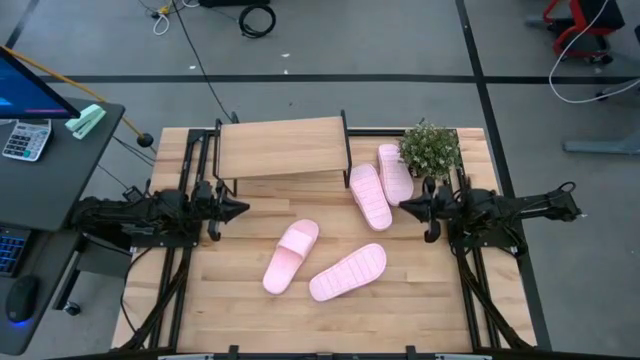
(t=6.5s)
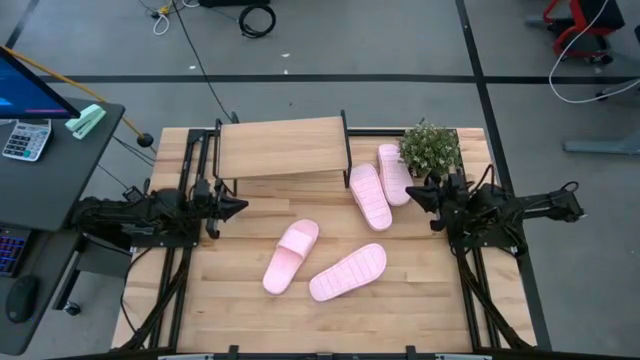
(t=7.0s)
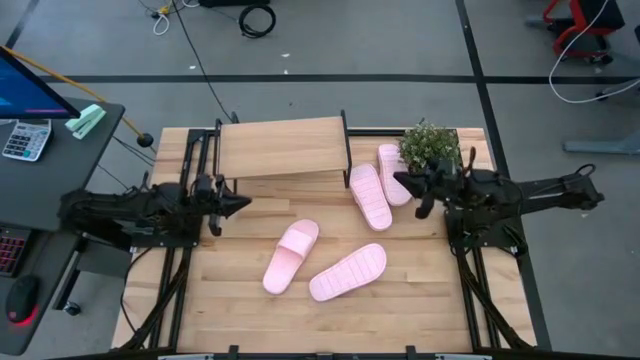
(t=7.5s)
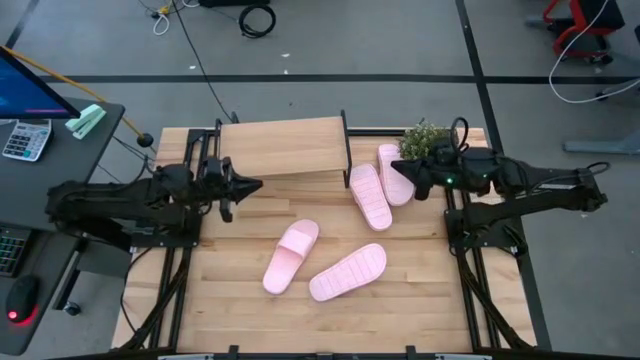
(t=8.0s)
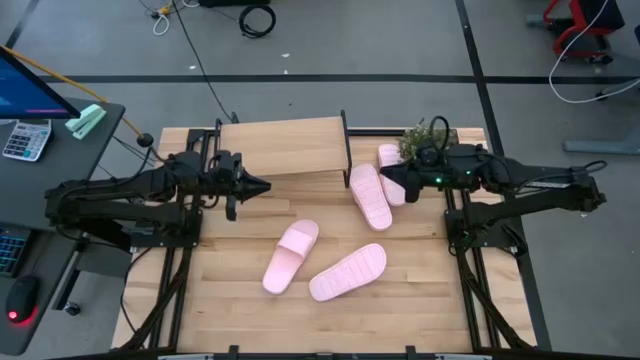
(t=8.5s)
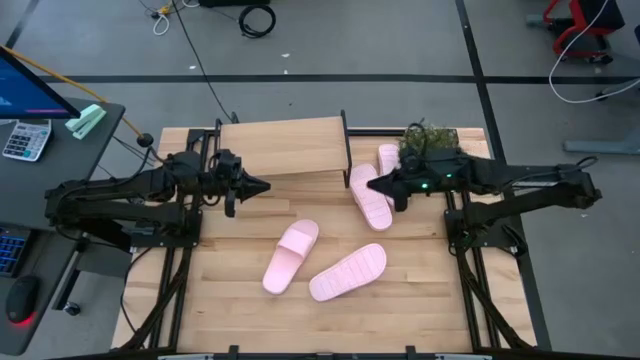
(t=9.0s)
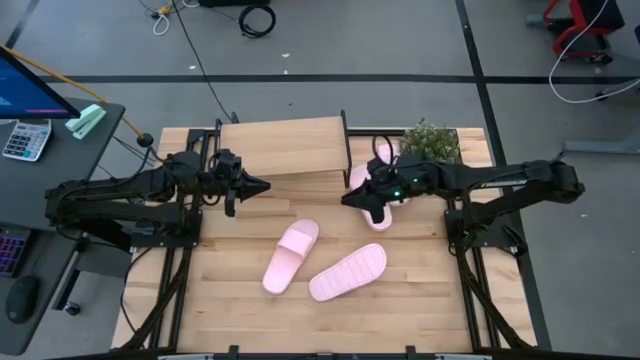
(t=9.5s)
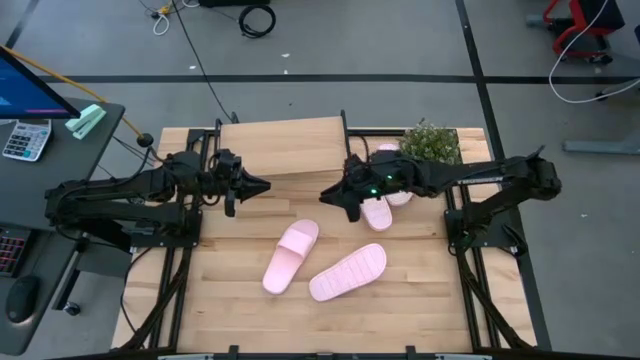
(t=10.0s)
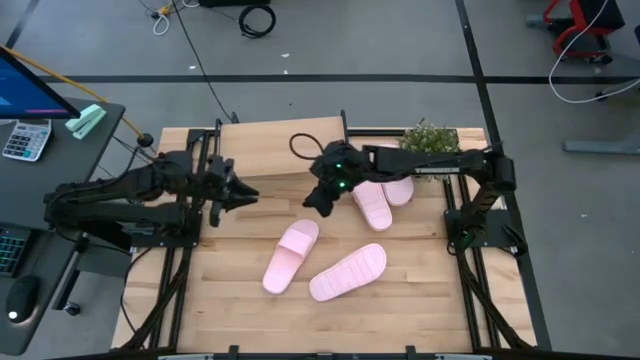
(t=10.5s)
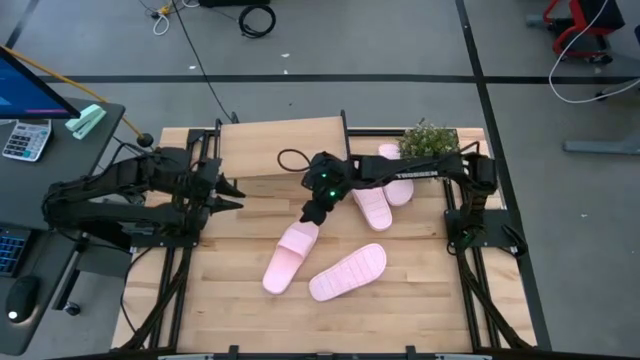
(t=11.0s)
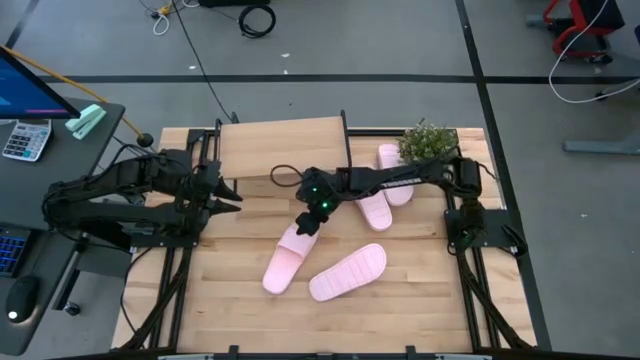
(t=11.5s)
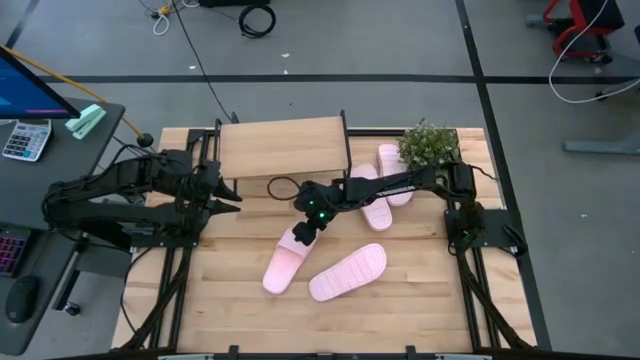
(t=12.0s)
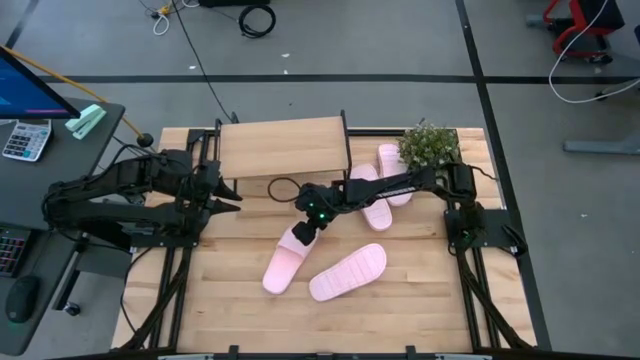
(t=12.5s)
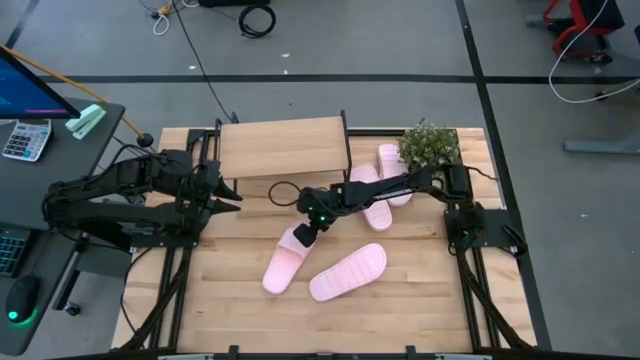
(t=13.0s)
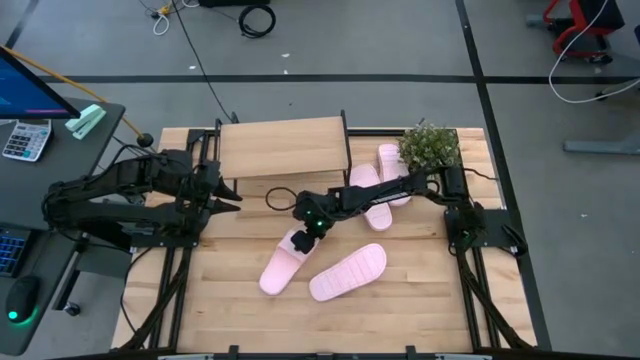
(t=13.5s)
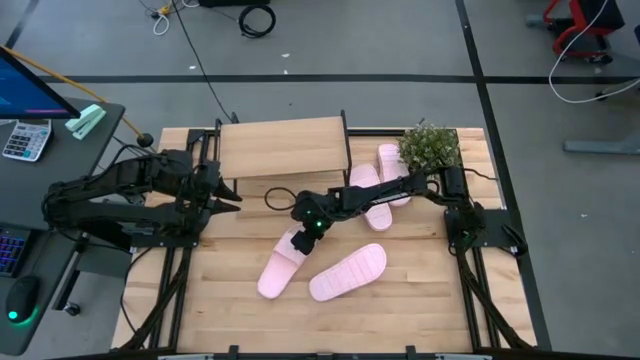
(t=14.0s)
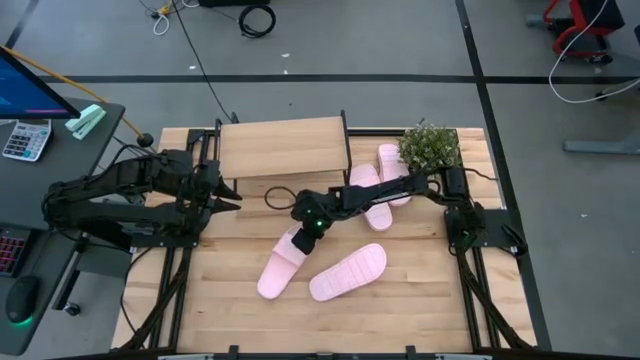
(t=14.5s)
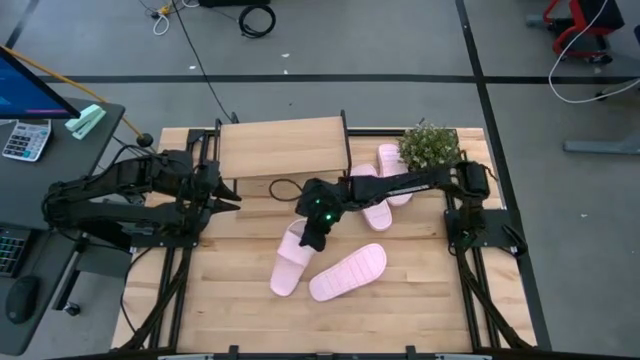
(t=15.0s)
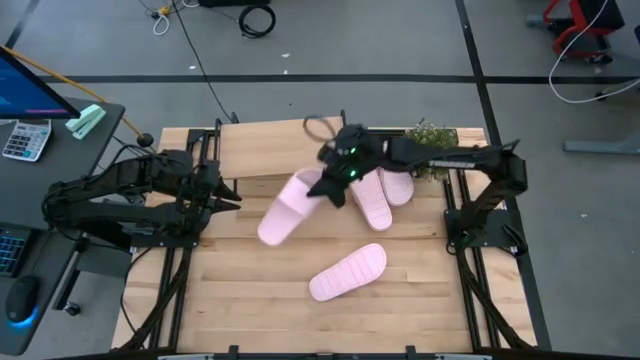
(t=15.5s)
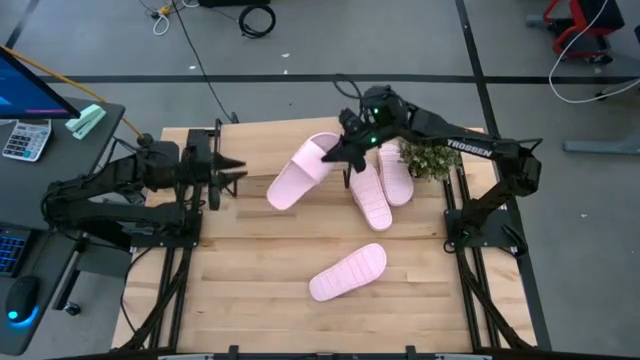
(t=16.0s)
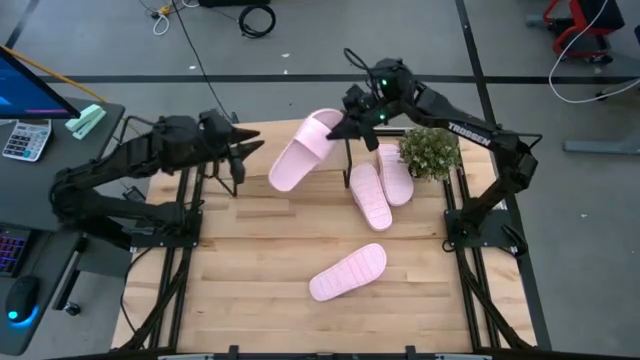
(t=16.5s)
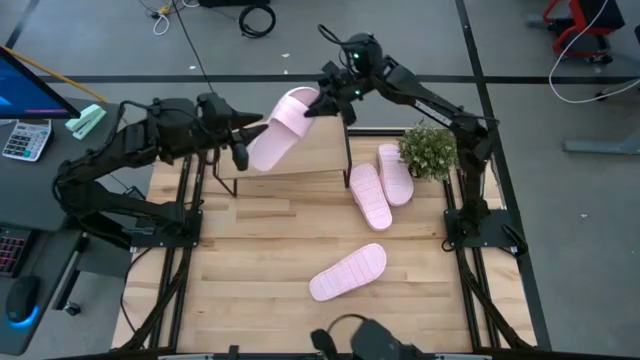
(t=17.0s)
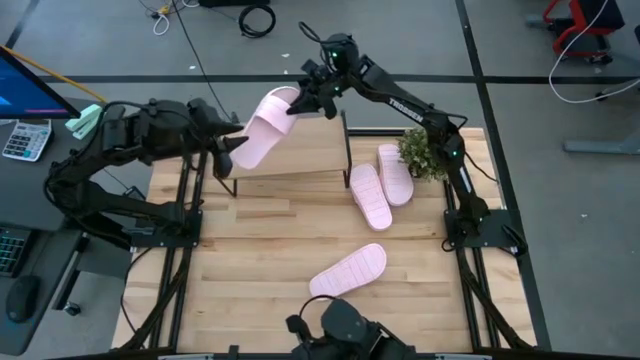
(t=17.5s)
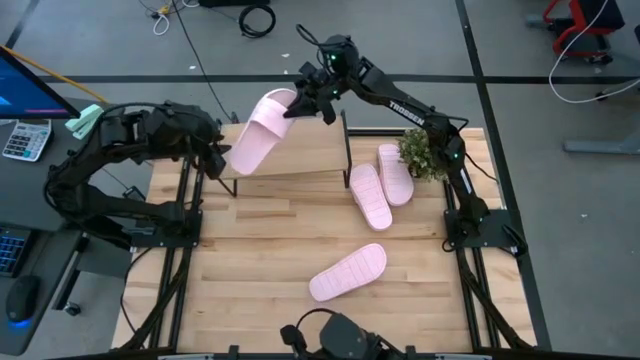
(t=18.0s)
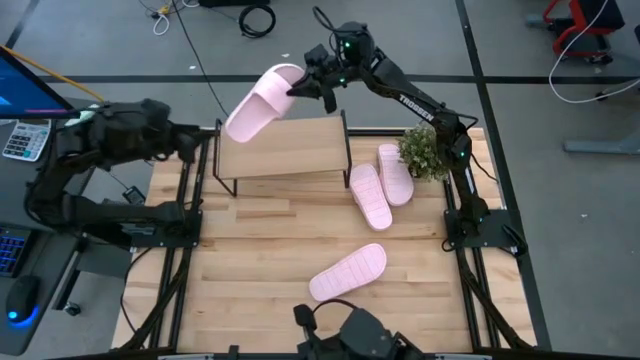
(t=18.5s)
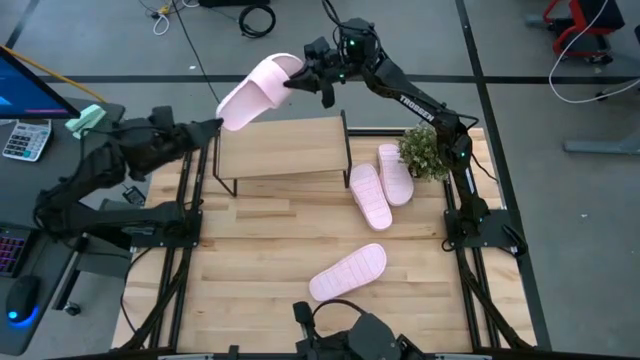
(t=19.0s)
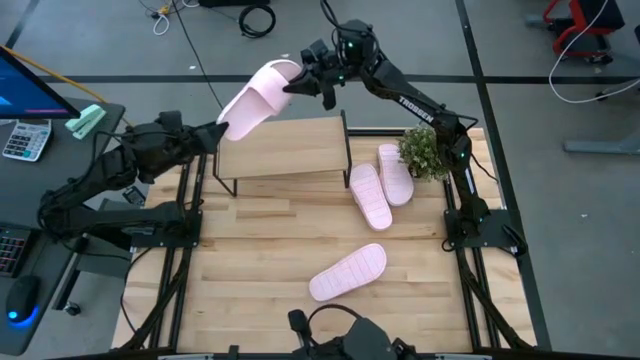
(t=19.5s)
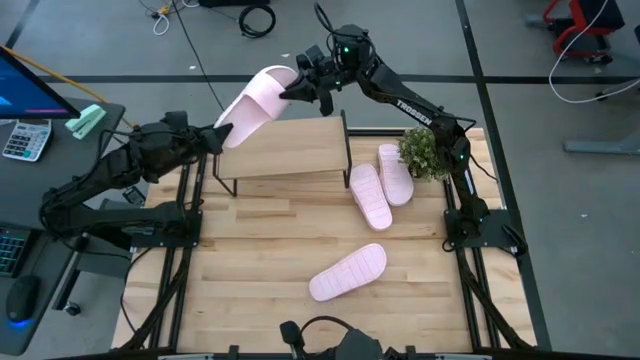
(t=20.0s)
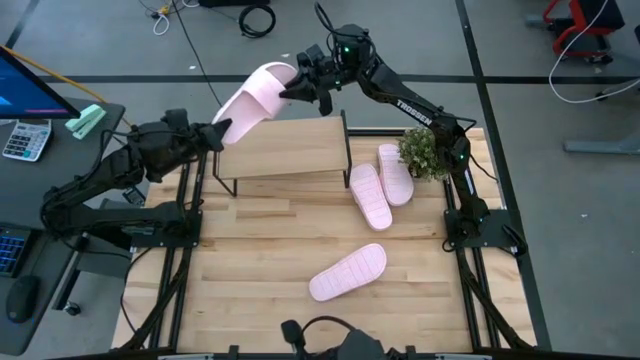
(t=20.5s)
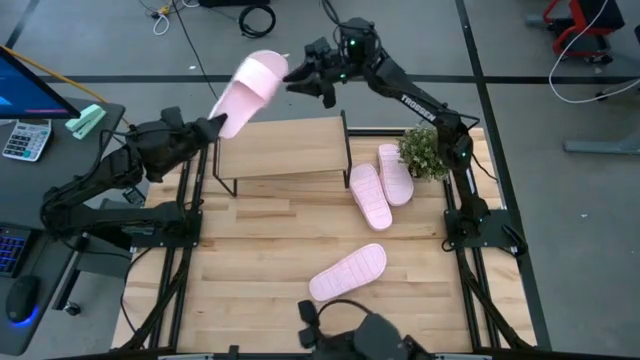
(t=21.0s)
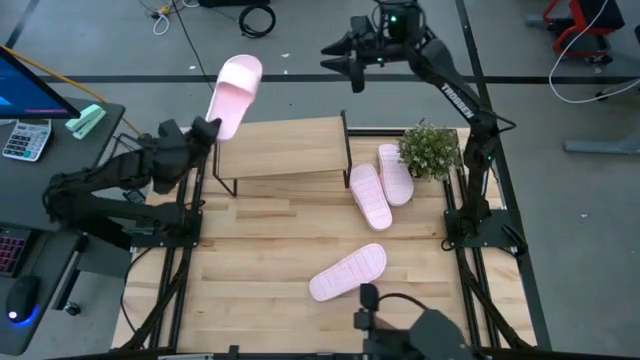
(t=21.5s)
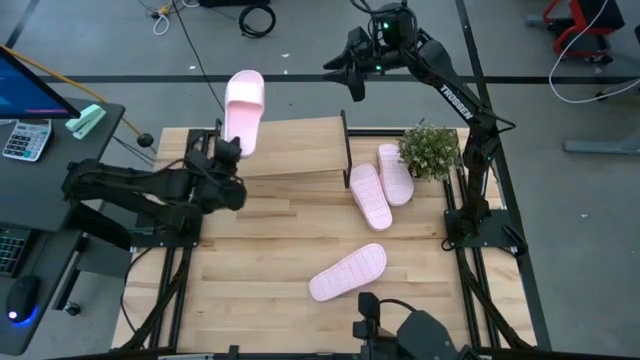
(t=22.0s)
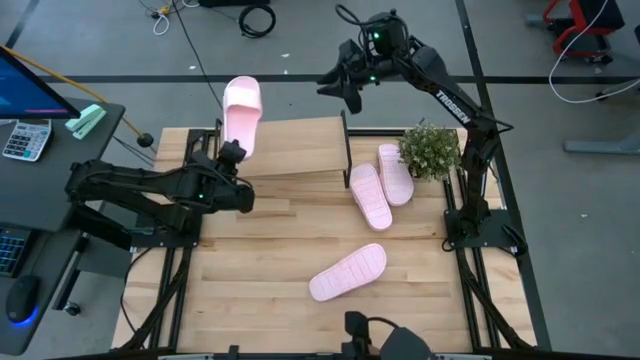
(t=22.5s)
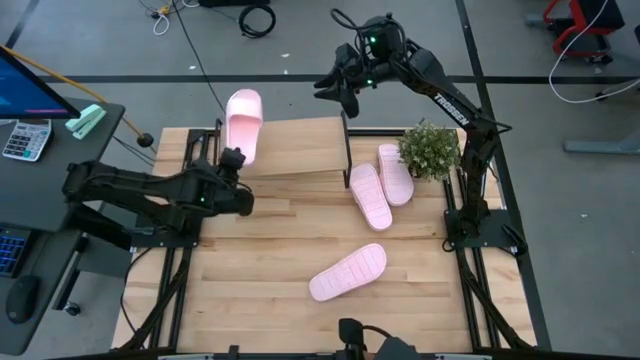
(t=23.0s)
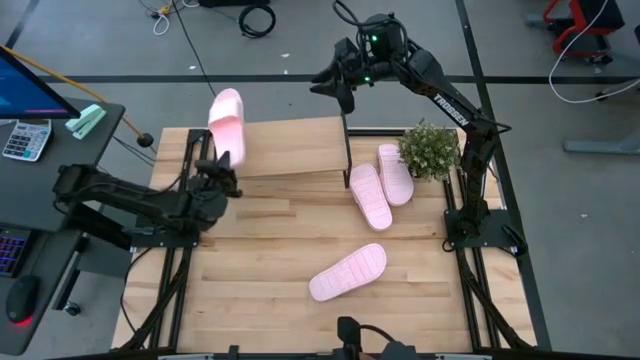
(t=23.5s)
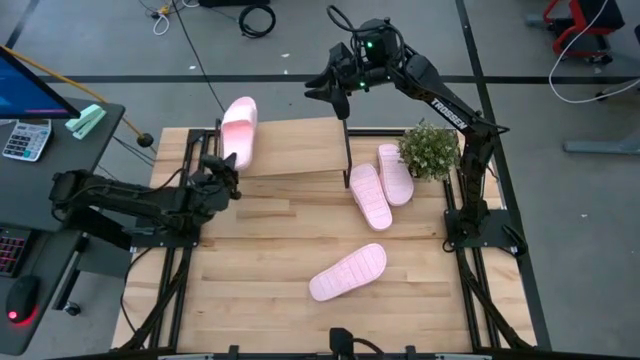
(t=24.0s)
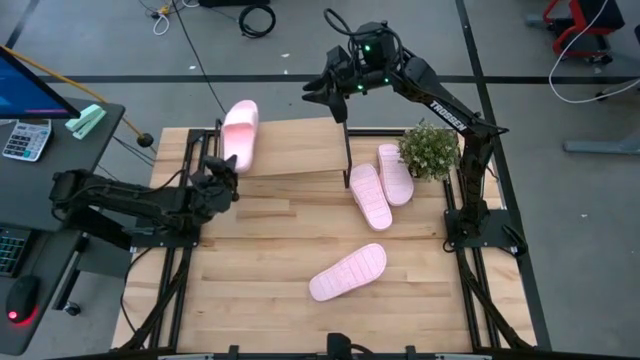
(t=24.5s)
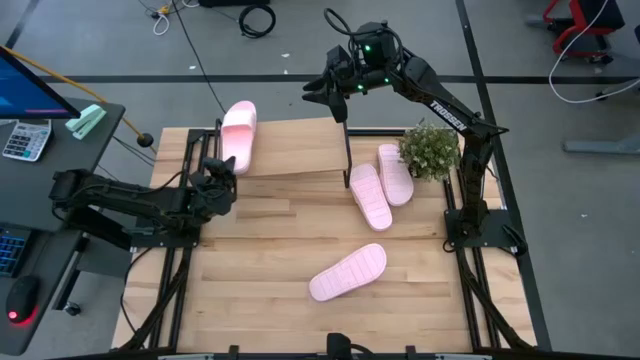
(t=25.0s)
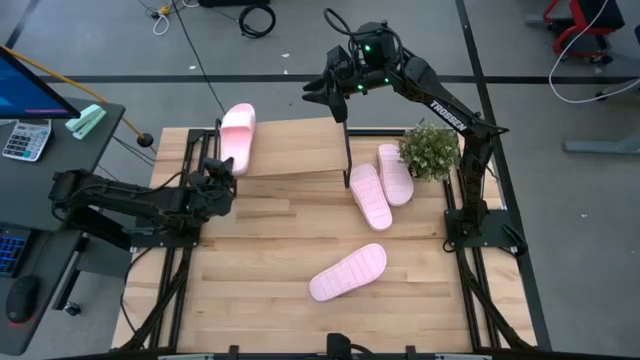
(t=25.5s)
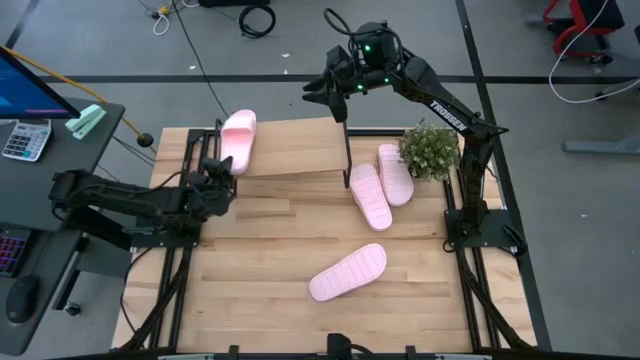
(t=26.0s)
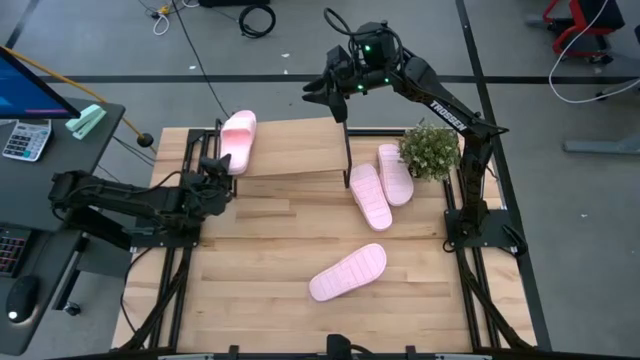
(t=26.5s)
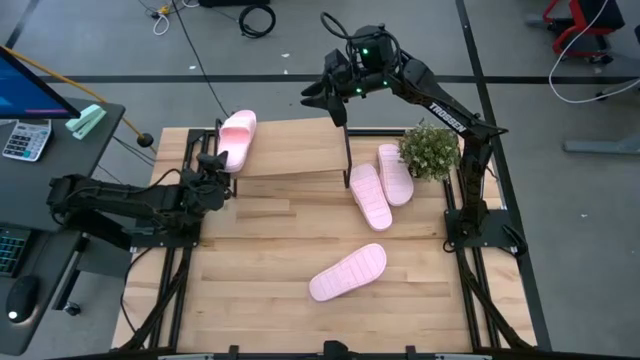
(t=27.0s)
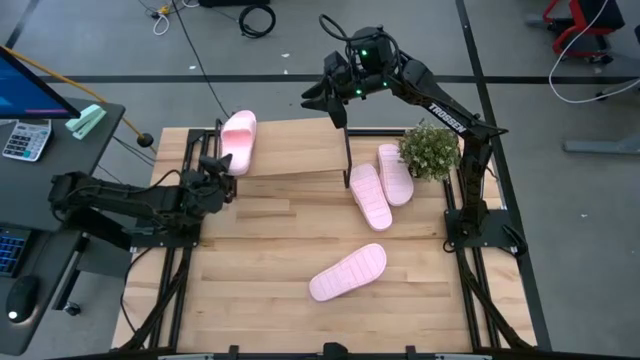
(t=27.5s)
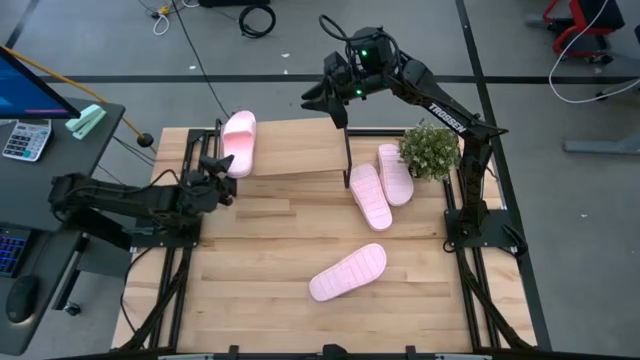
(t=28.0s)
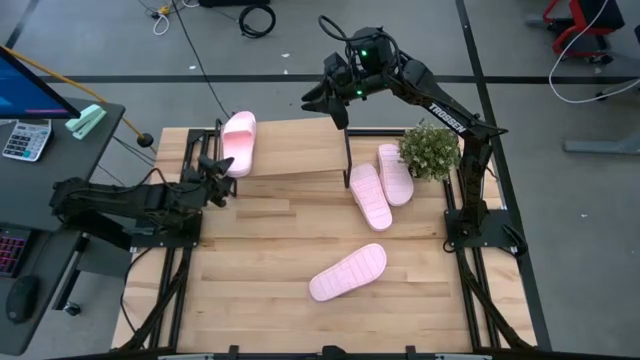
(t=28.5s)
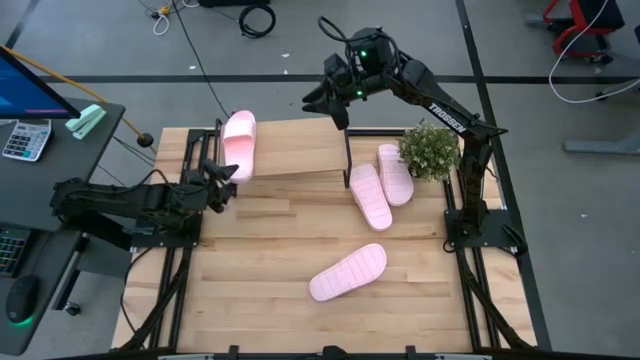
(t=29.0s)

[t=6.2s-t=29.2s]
Task: Pick and place slides into the shelf
Put the pink slides on the shelf
